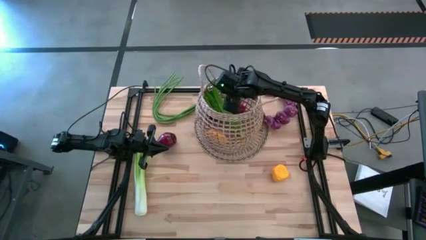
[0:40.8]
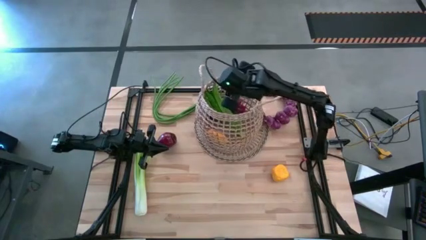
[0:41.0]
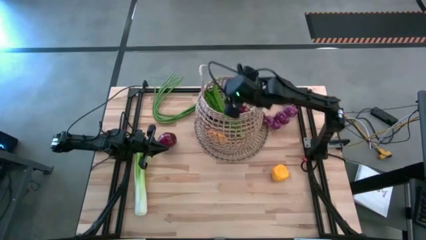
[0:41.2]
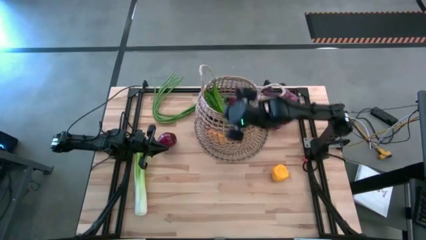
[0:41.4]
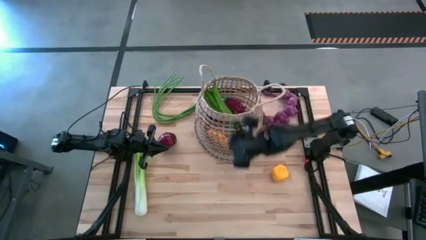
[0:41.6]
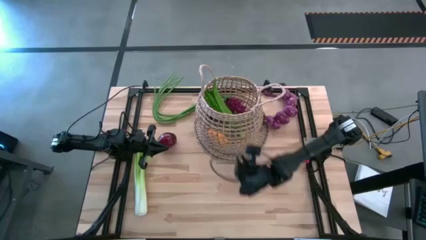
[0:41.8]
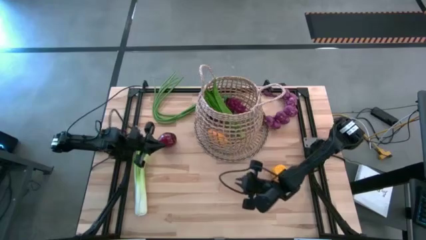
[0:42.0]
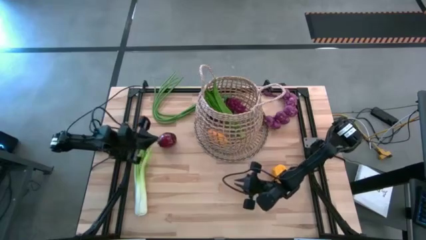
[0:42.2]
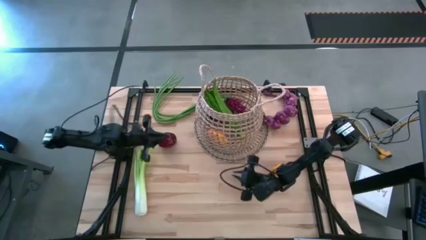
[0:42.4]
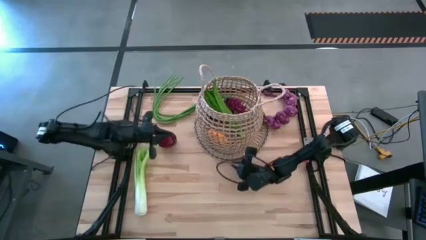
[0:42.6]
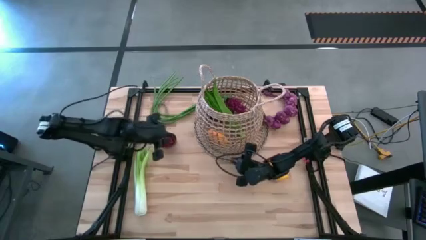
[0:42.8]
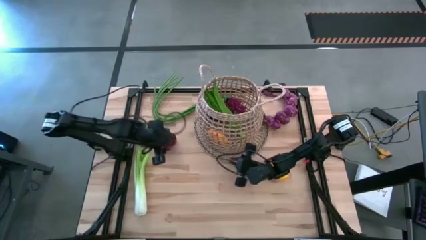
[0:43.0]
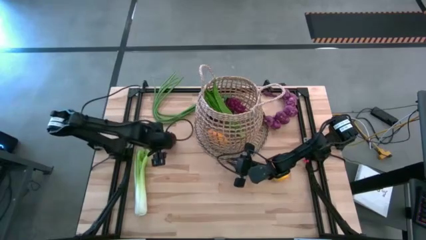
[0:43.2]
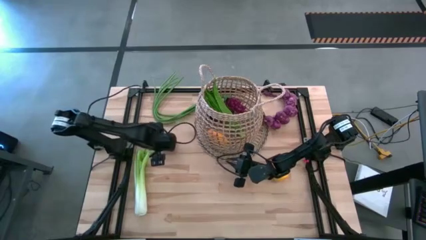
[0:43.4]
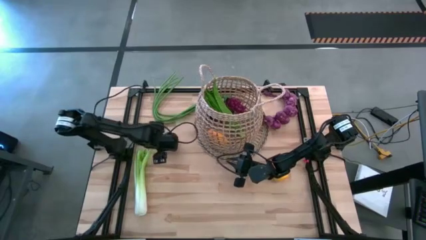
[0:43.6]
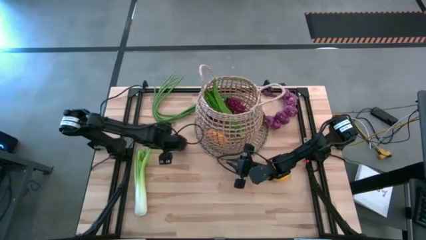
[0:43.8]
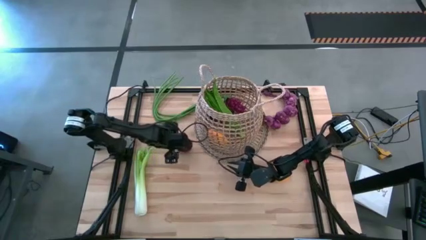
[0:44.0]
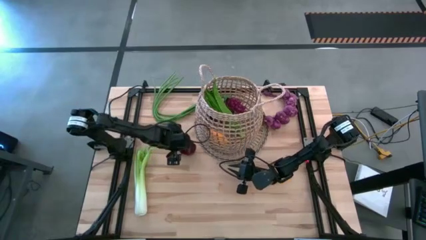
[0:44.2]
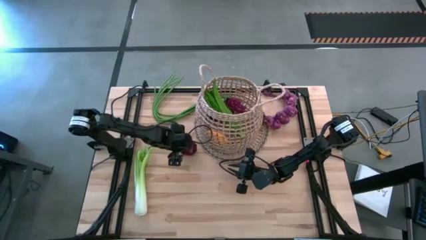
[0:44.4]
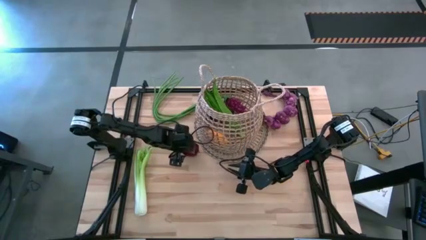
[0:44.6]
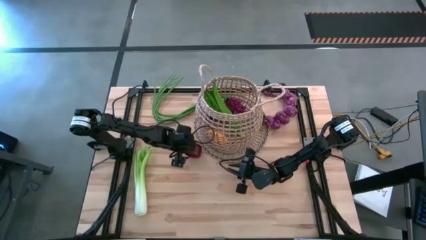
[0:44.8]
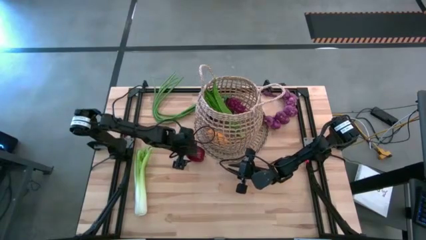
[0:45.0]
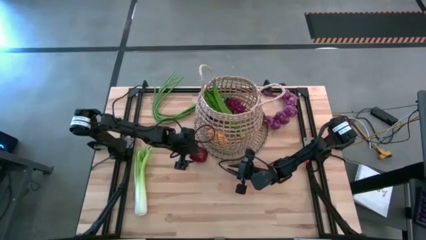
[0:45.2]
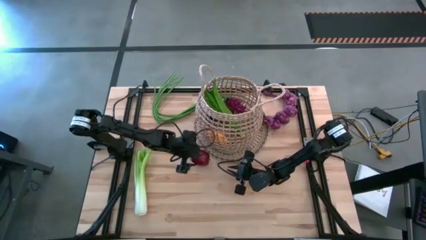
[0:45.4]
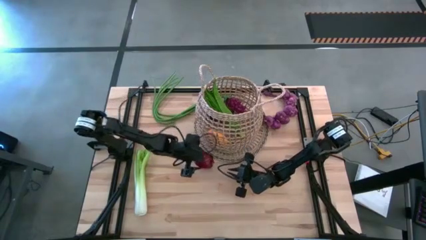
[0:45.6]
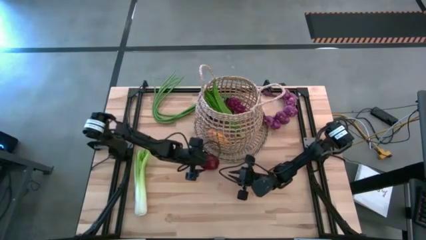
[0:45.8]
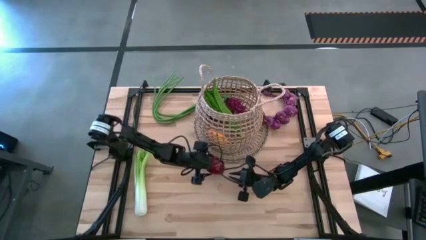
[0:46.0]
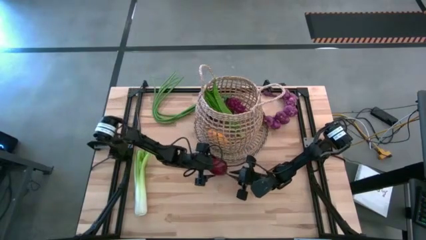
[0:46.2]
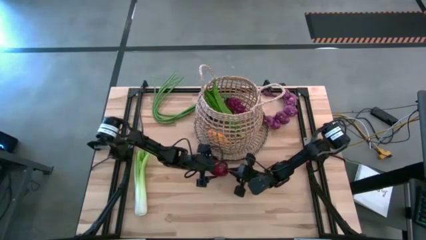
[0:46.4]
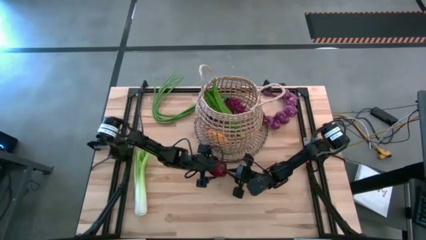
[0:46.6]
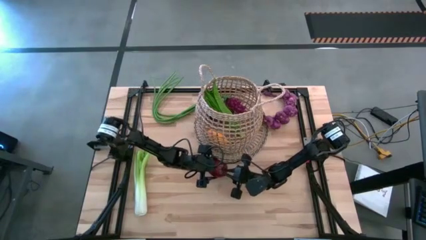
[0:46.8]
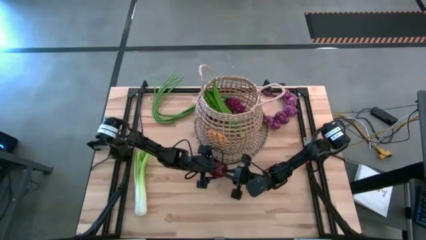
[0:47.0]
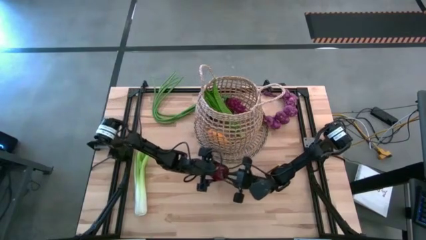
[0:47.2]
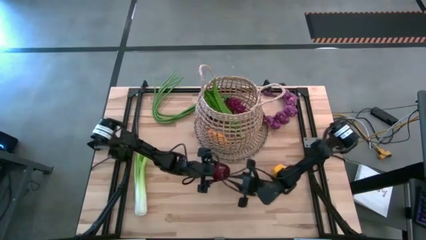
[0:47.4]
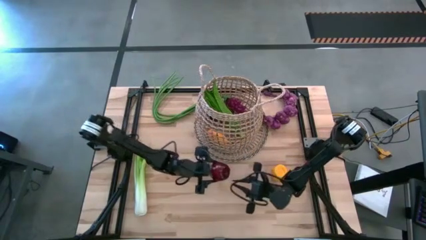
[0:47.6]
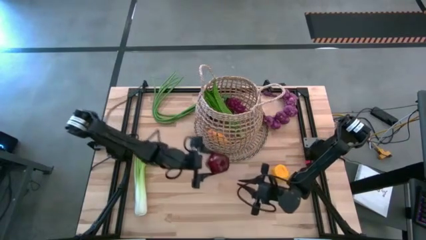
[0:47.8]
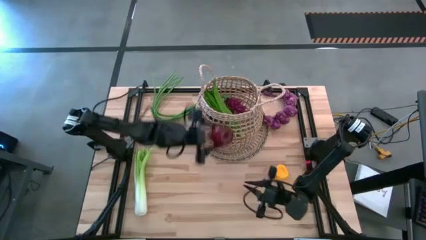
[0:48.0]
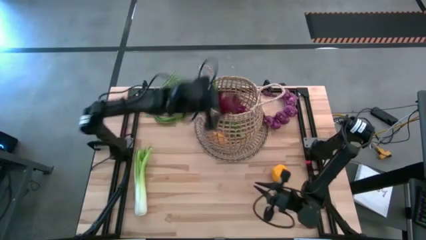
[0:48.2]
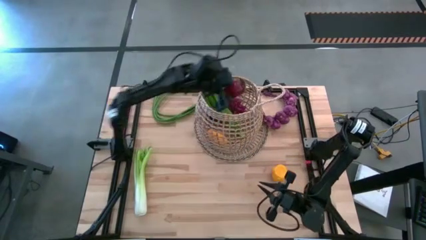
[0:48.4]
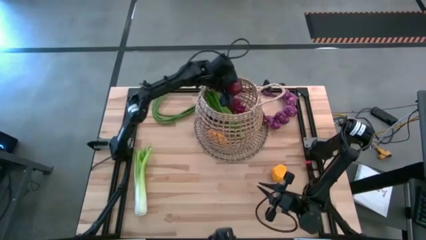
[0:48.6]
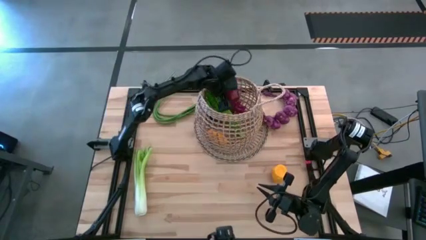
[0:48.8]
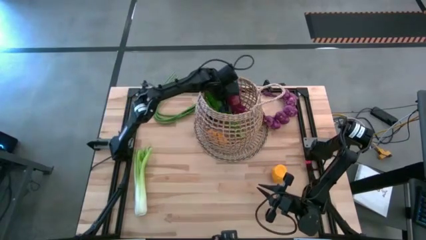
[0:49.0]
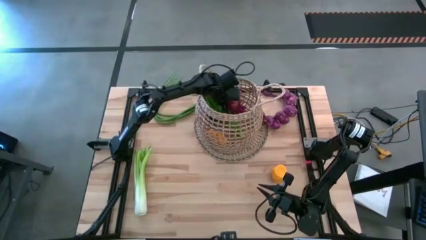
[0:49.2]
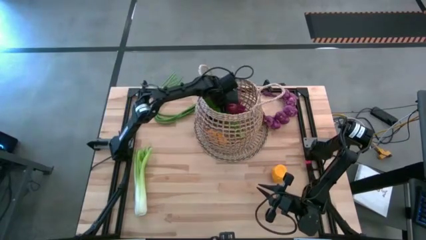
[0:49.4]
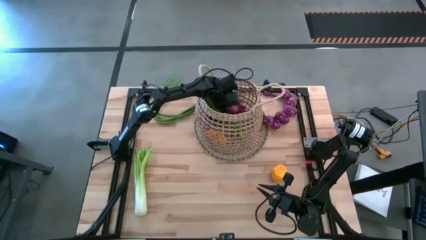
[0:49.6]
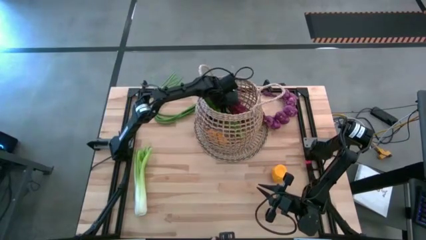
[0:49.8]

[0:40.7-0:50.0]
Task: Build produce basket
Put the apple into the light brown basket

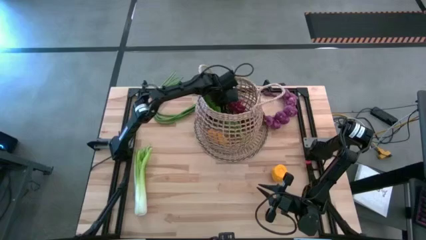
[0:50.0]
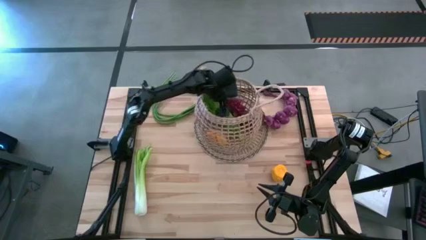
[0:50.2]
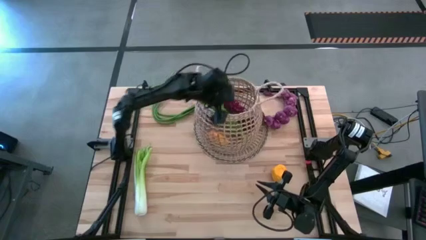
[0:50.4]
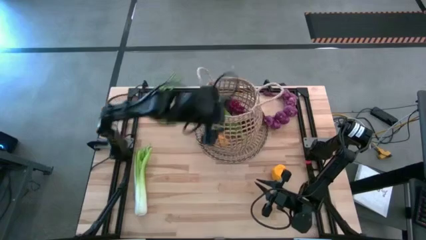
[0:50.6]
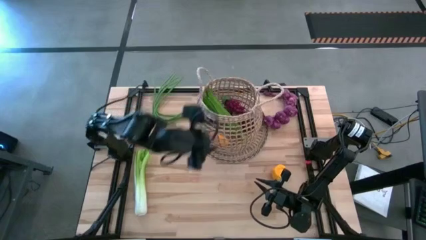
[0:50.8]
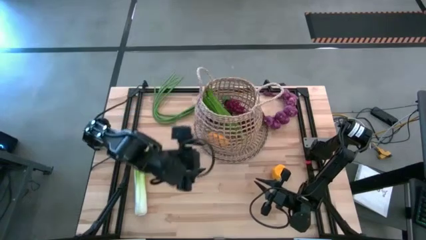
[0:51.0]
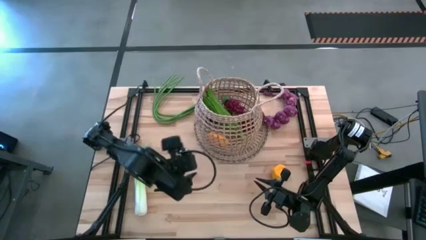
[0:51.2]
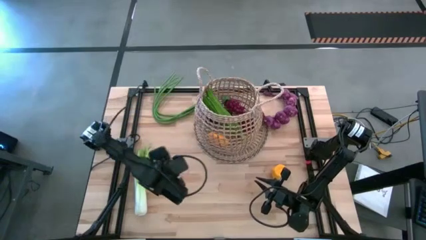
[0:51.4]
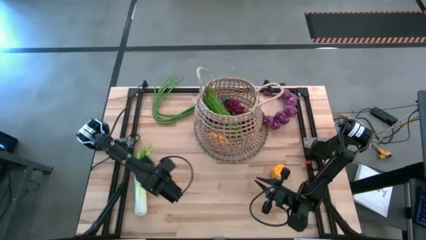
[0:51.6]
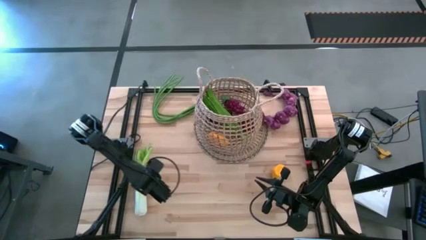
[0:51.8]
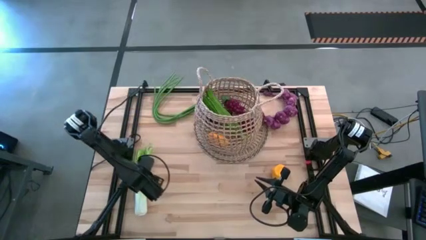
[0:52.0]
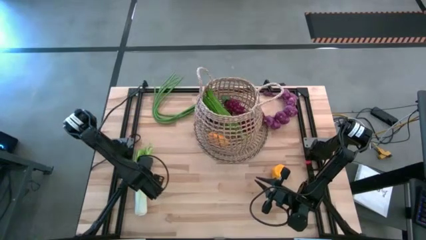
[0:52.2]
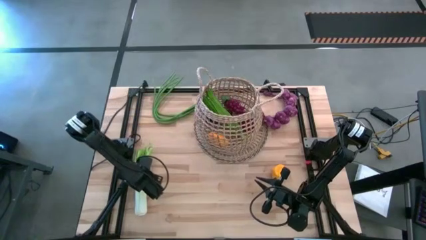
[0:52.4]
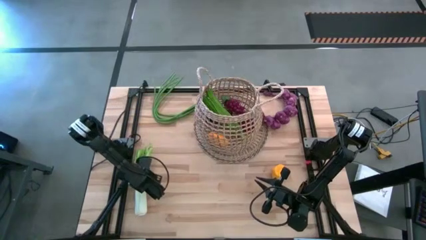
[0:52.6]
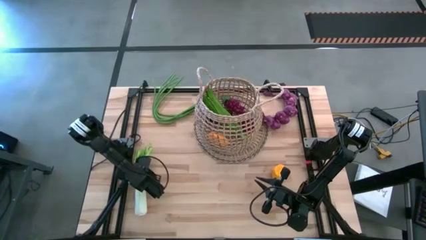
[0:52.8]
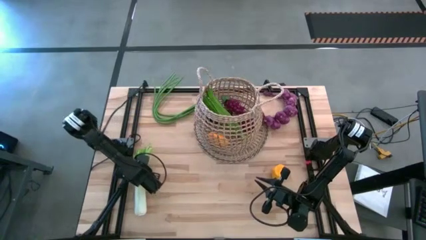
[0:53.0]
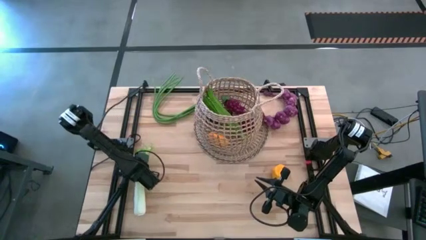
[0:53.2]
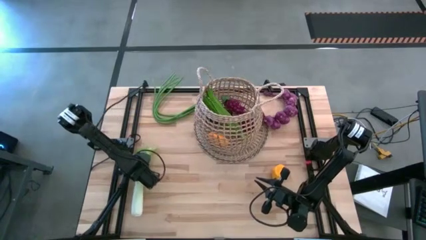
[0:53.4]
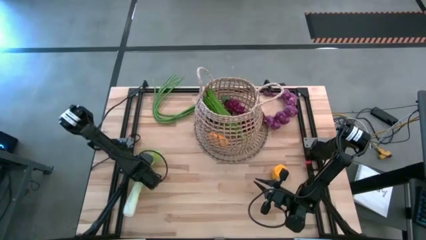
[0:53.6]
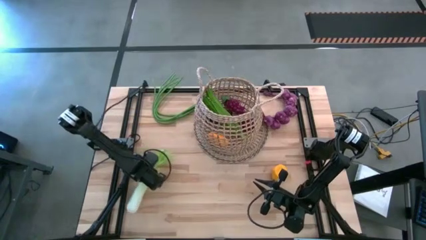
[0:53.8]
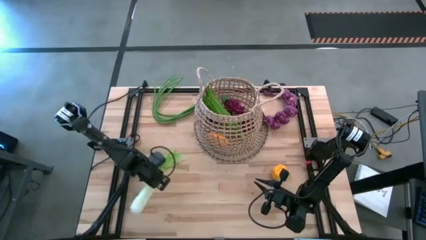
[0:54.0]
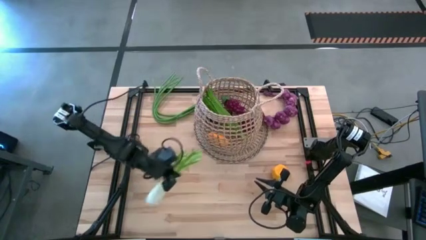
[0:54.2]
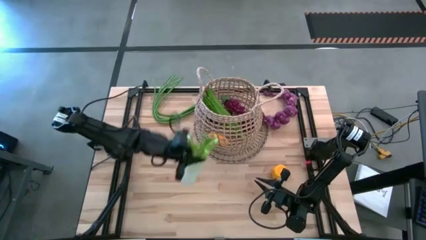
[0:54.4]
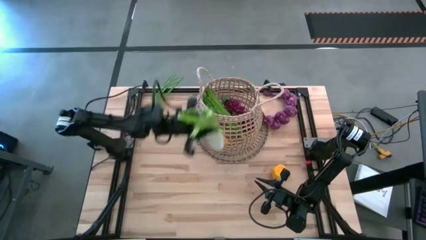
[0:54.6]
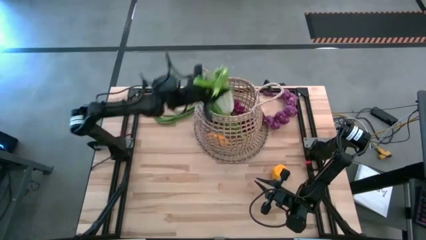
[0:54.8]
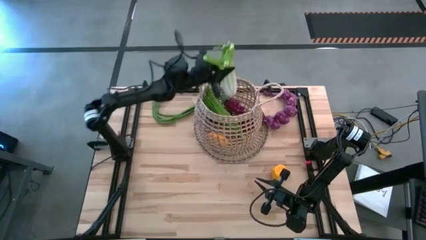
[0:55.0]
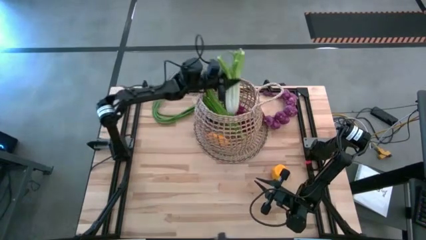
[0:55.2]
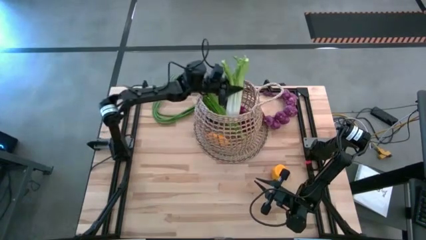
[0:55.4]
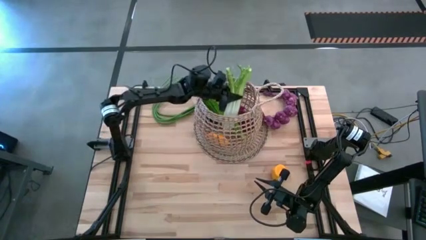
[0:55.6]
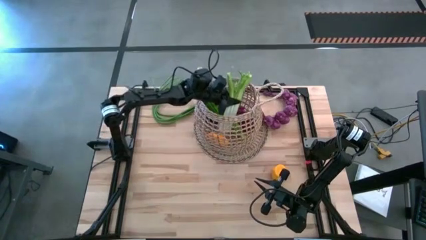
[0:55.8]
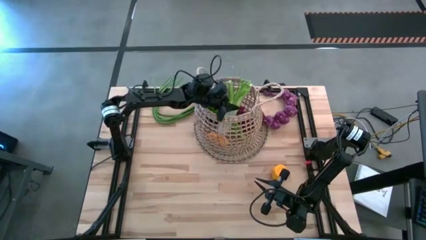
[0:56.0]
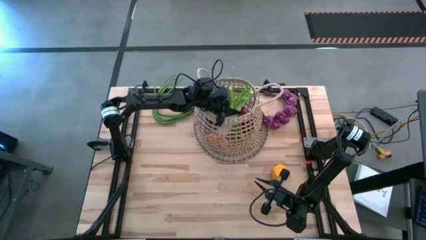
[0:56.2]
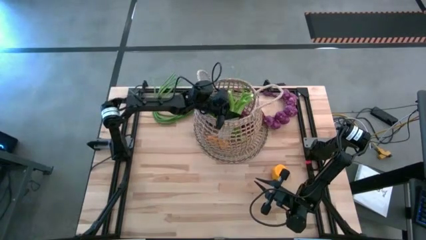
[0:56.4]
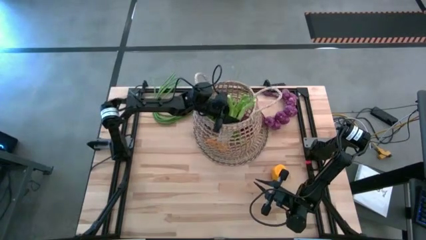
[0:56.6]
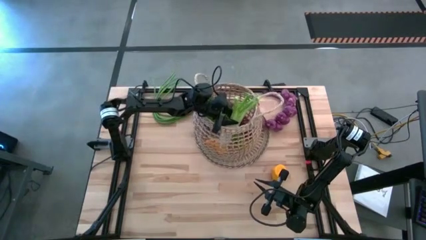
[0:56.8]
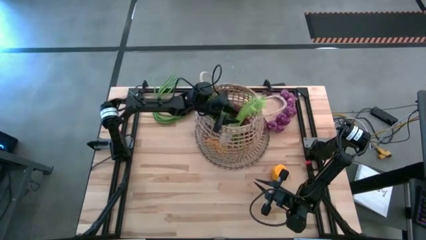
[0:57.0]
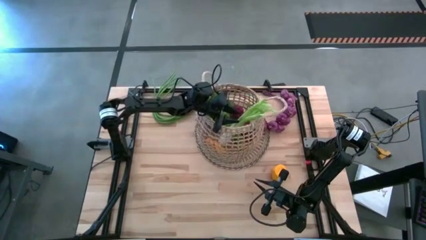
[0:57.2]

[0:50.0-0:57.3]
Put the leek into the basket

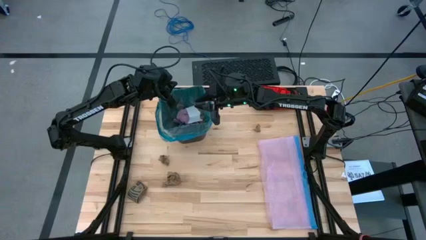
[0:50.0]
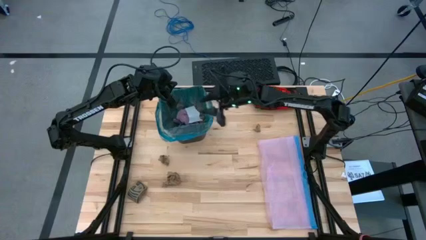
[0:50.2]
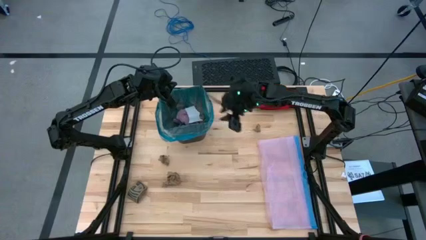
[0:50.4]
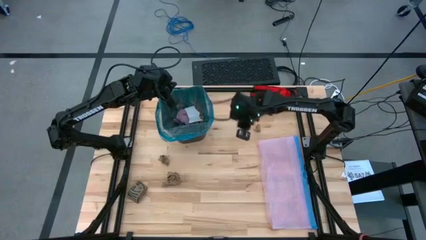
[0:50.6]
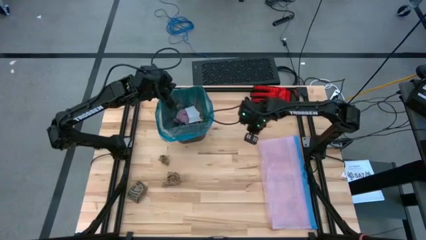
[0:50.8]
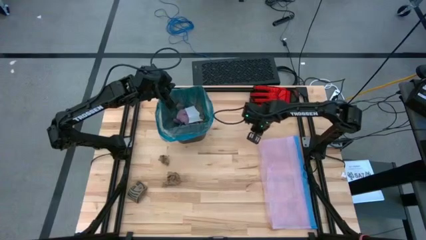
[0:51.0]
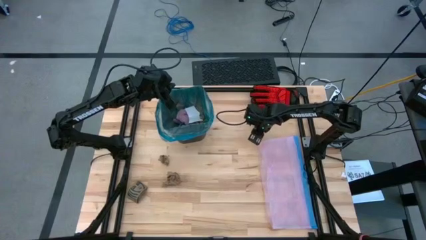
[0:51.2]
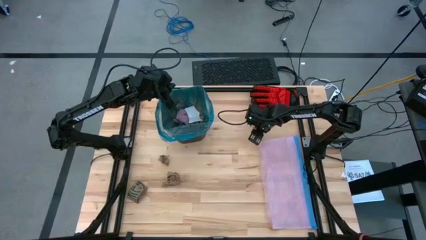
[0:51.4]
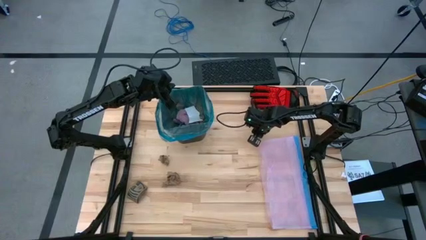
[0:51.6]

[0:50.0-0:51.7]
Task: place trash/remove bag and relplace
Put the brown napkin into the black trash bin
